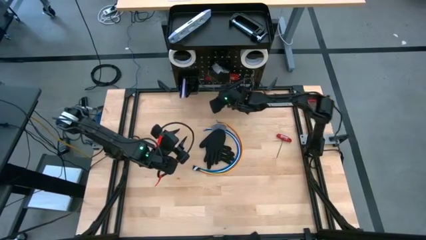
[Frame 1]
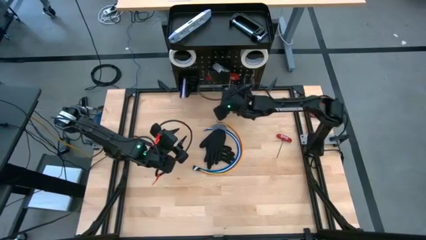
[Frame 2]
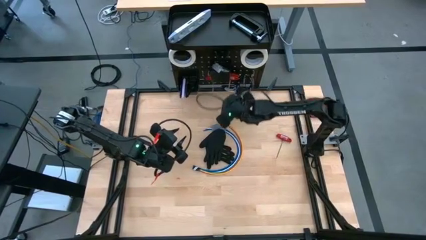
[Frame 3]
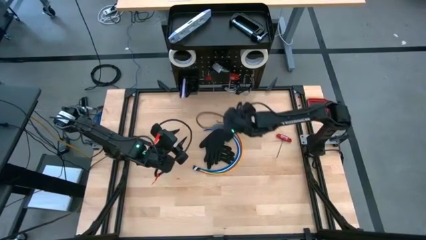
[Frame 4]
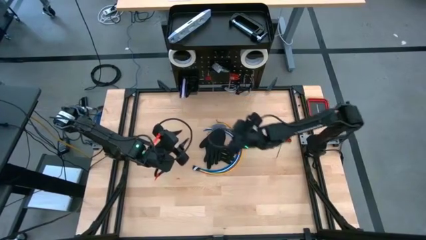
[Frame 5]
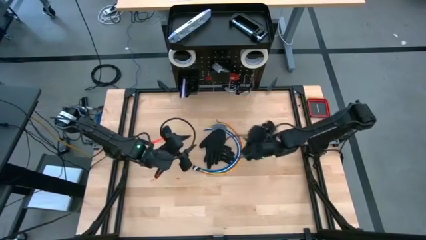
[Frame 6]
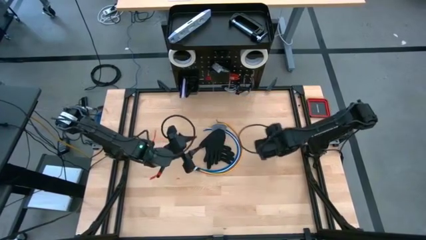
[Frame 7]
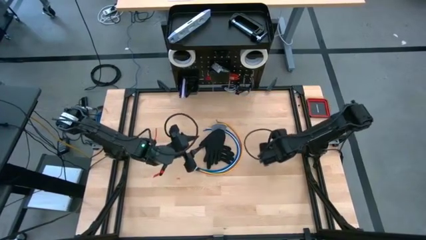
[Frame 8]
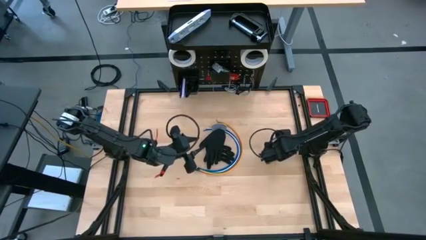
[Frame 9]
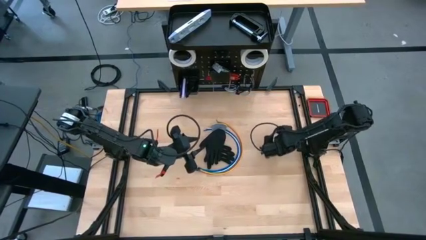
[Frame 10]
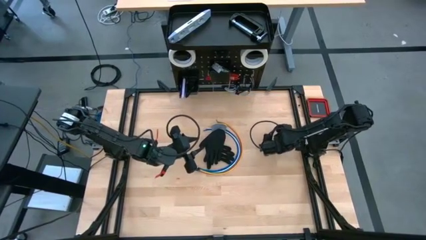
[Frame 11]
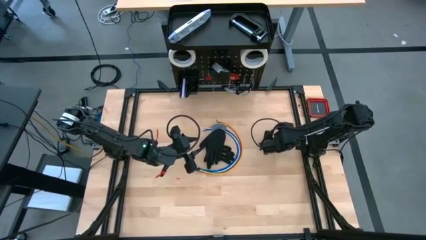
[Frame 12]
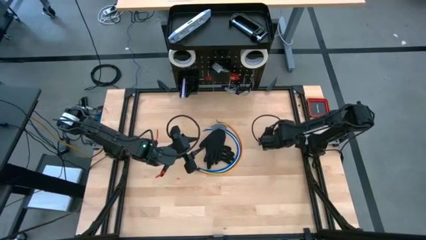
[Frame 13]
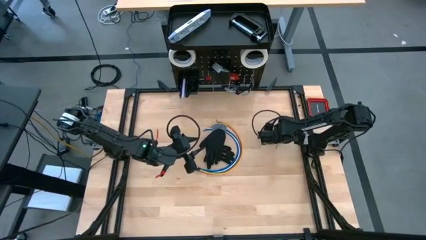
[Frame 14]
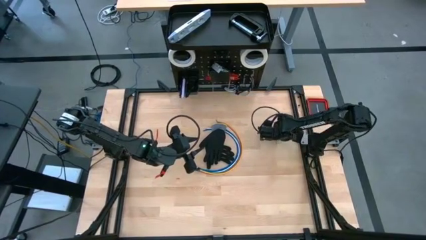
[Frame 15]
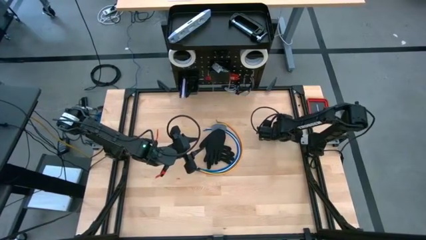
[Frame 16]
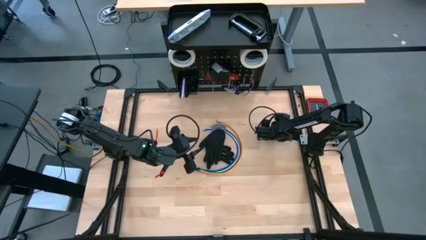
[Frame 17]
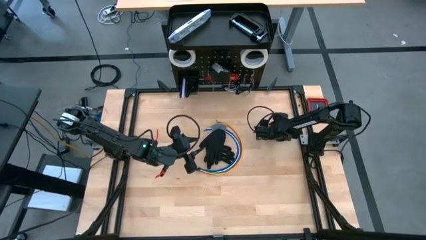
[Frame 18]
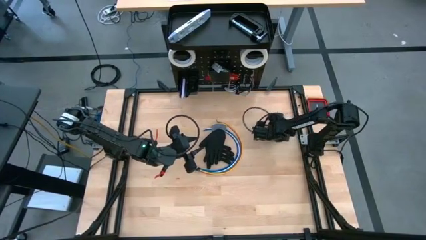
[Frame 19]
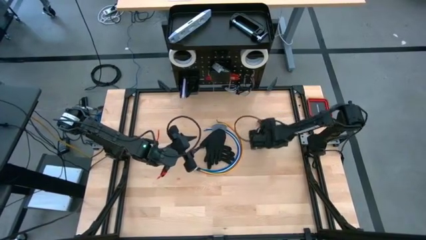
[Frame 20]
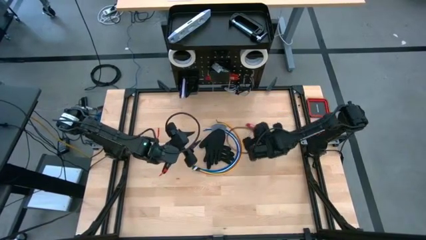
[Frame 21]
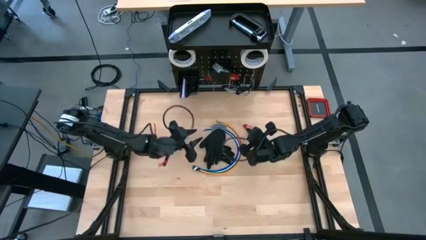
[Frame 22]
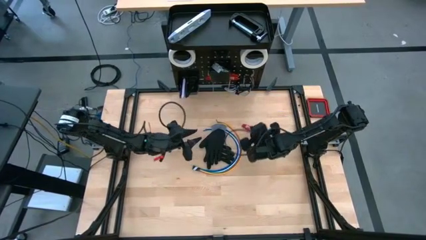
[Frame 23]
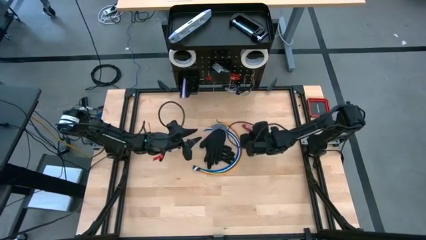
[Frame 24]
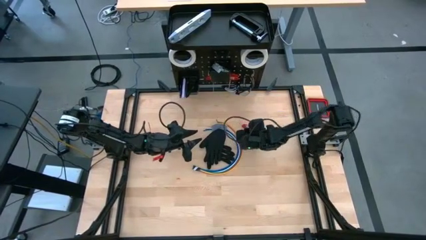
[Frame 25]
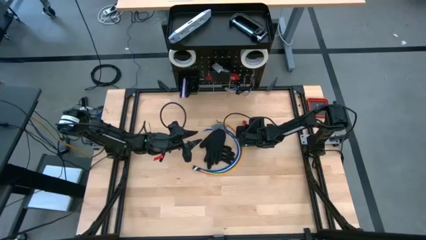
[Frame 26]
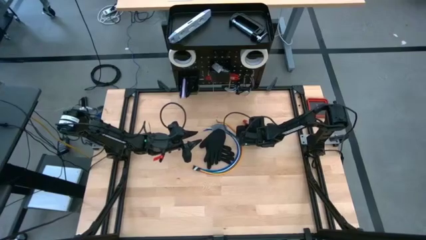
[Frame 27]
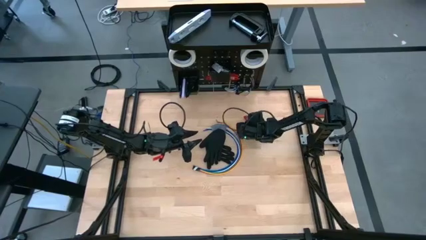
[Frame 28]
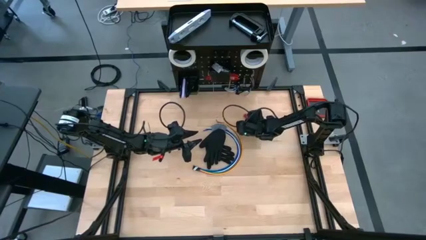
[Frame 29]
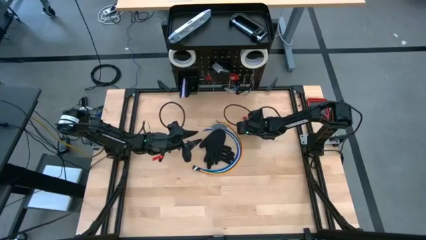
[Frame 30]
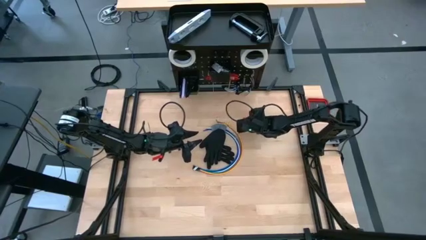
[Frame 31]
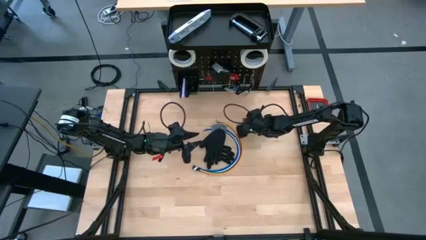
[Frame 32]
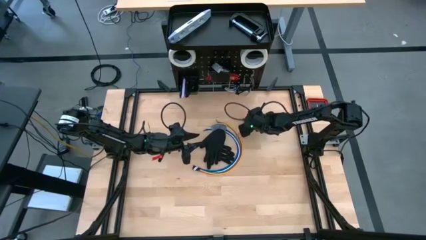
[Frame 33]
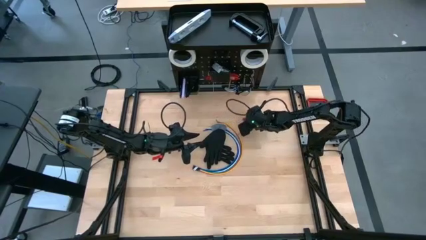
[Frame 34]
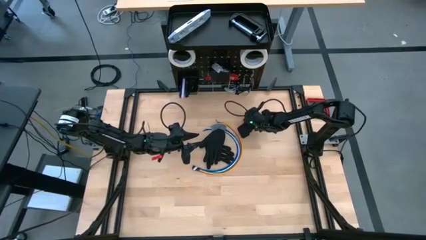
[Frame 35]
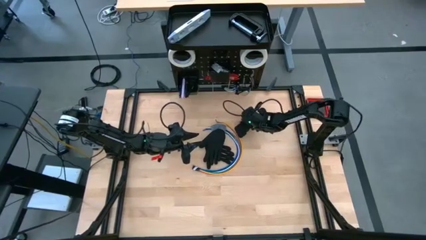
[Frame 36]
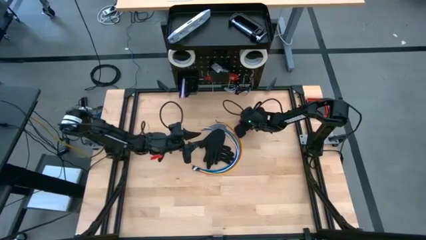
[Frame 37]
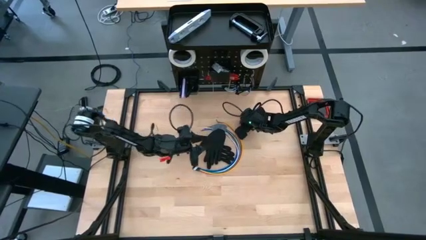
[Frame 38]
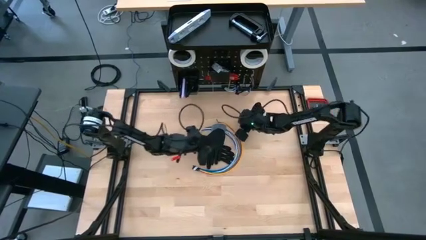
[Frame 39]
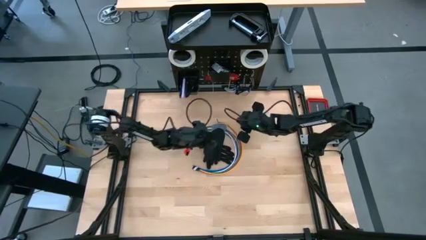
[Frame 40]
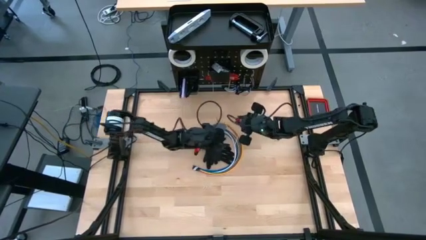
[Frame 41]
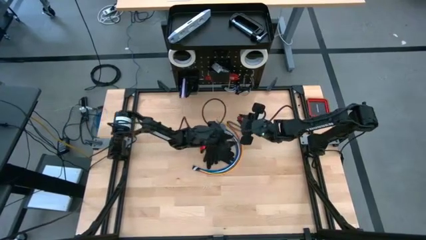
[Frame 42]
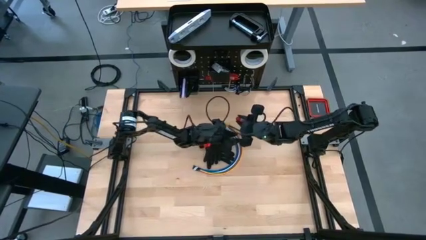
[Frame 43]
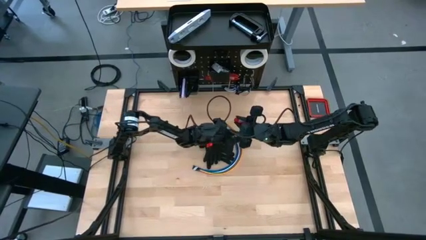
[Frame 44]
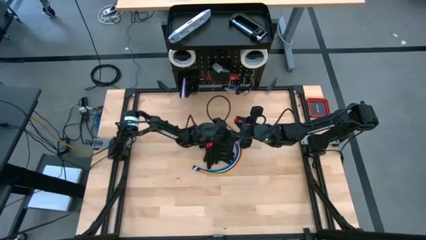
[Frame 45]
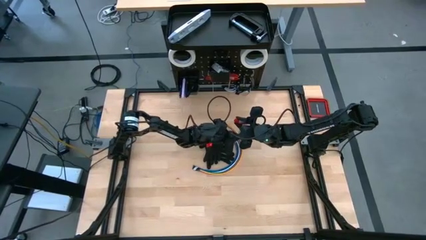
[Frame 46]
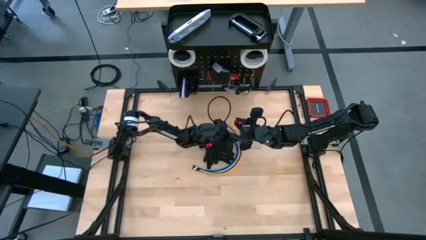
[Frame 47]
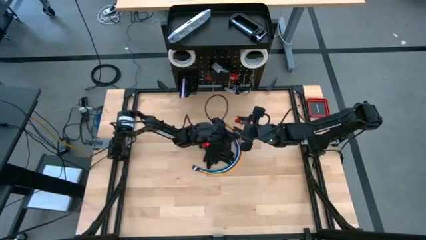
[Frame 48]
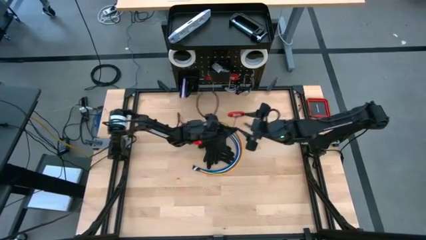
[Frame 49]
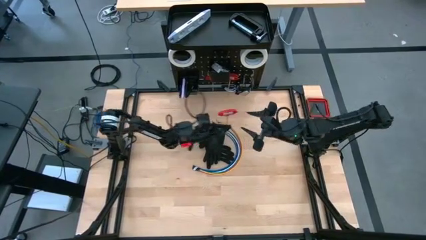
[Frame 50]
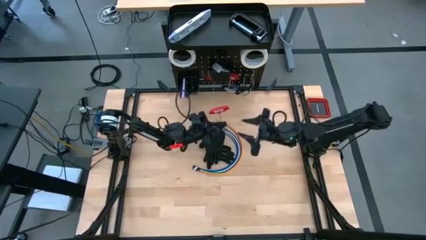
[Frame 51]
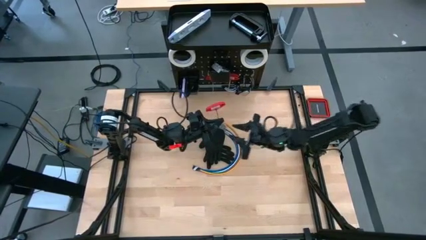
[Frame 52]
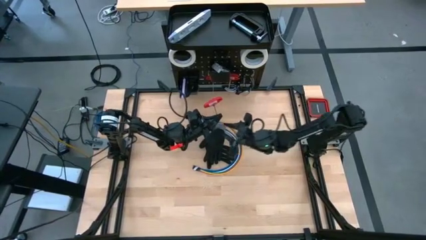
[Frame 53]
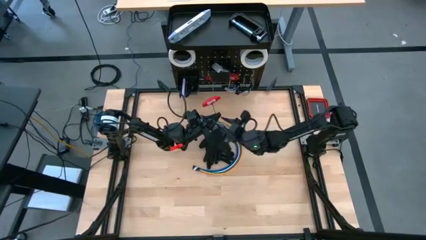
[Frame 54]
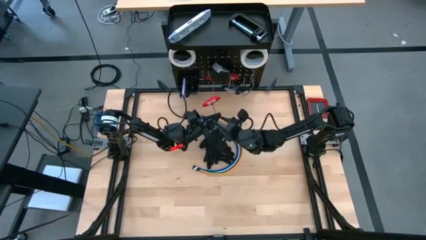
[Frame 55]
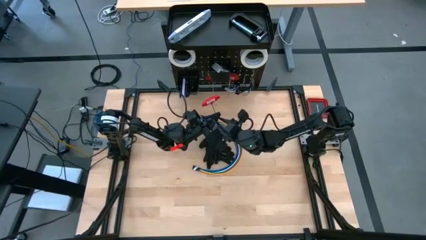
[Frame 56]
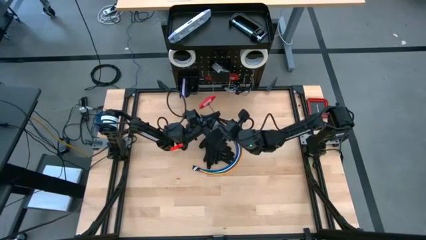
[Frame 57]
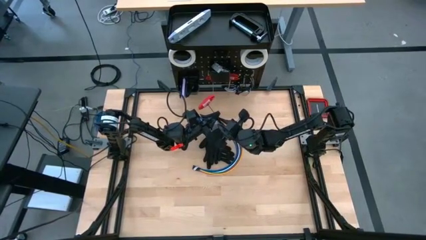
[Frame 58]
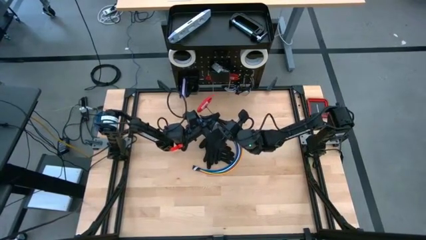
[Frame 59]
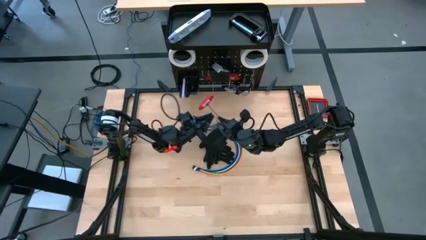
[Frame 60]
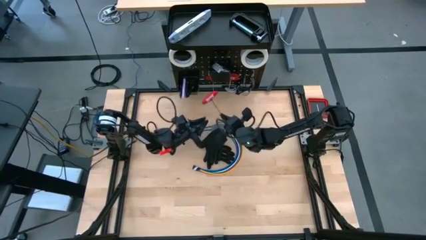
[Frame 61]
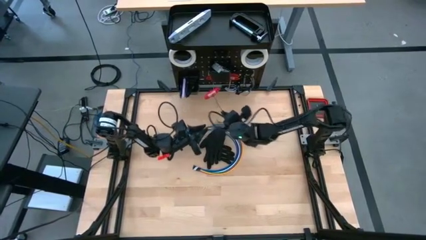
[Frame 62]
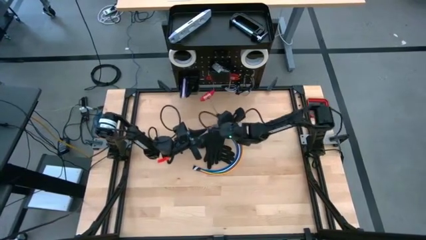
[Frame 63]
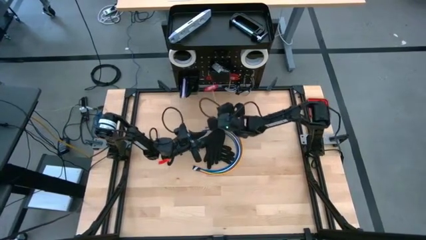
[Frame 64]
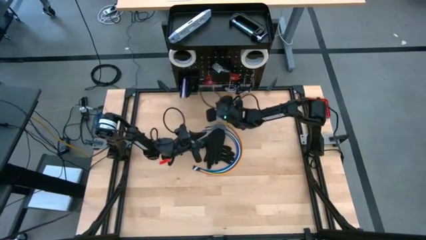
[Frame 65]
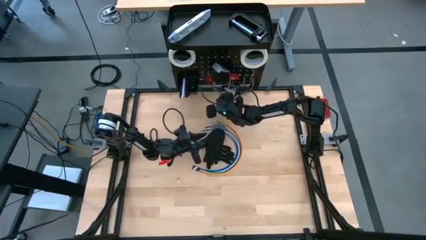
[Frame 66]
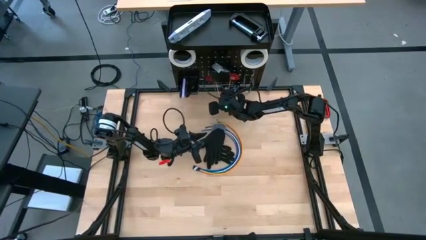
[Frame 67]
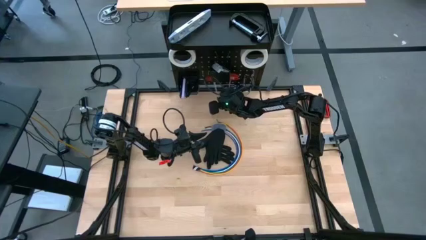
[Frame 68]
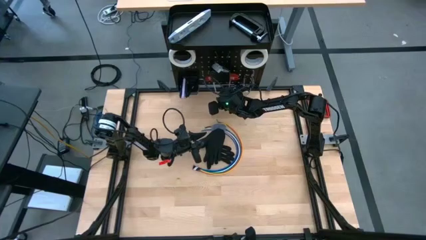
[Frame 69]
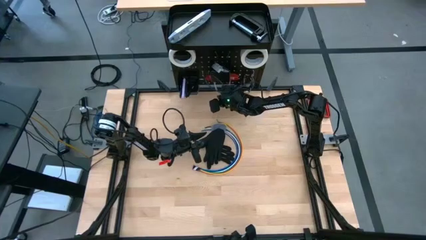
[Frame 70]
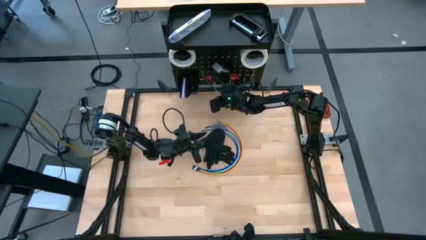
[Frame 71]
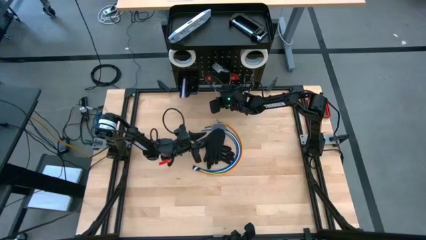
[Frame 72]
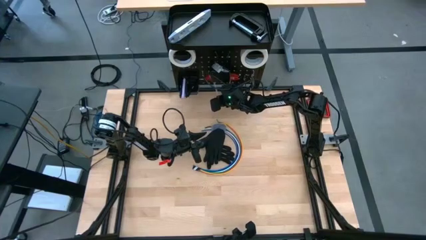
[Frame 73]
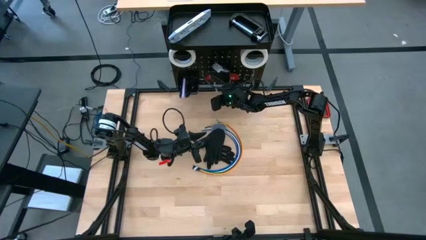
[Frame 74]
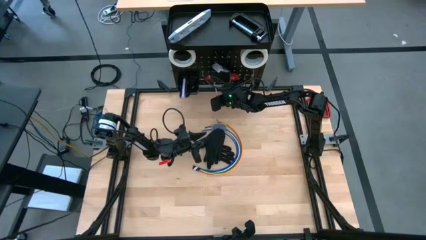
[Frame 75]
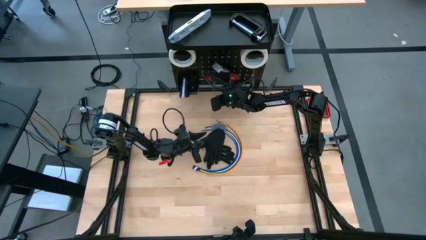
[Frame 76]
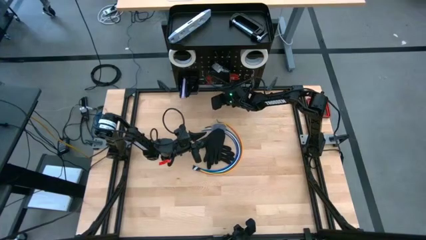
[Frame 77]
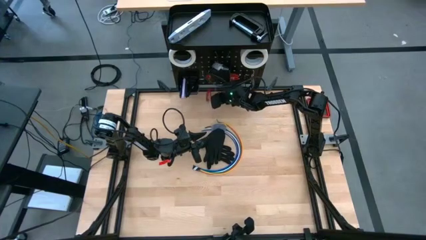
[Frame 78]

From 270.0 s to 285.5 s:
Task: Hang tools onto peg board
Hang the red allen wrench on the peg board

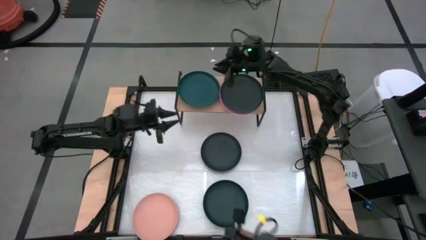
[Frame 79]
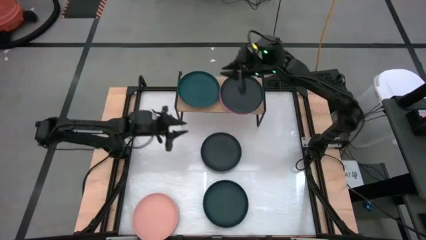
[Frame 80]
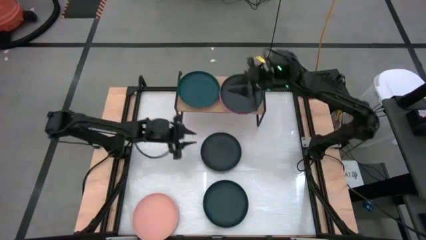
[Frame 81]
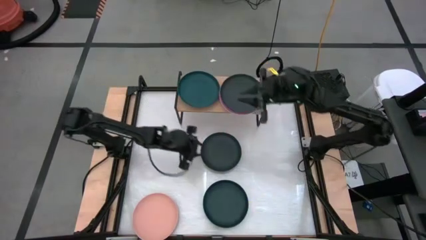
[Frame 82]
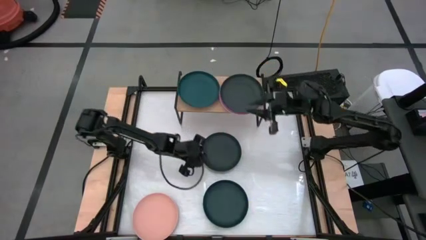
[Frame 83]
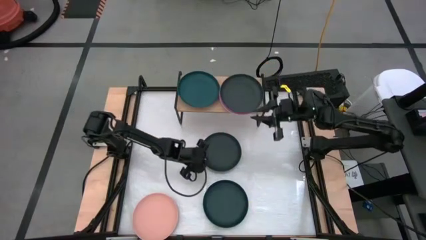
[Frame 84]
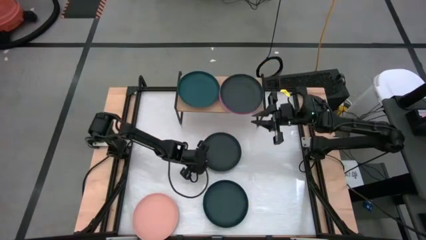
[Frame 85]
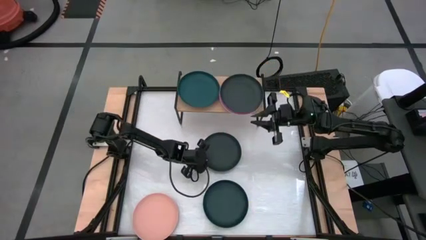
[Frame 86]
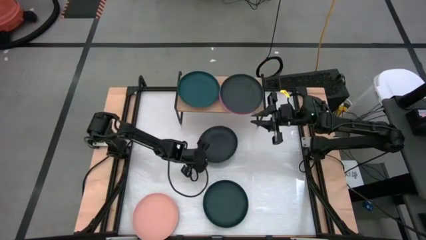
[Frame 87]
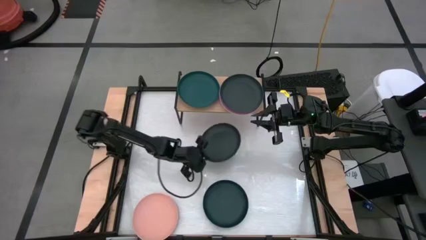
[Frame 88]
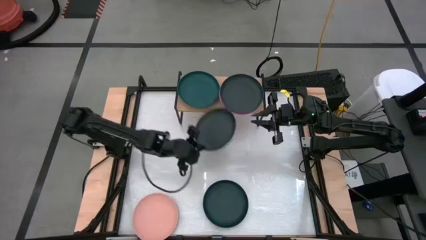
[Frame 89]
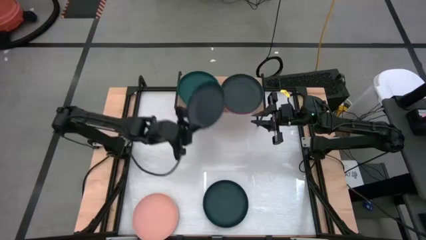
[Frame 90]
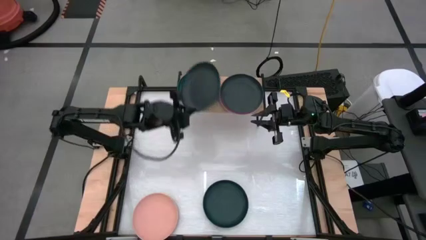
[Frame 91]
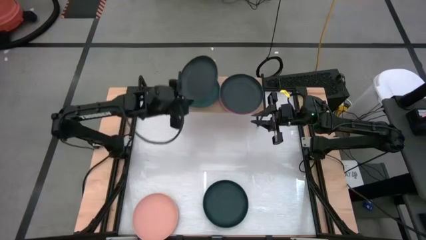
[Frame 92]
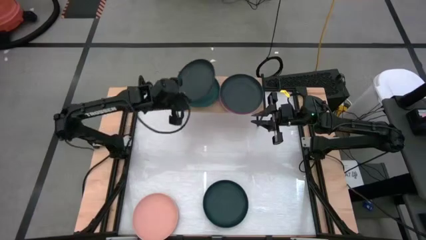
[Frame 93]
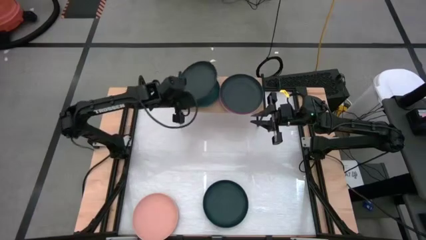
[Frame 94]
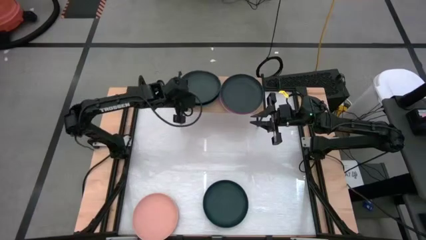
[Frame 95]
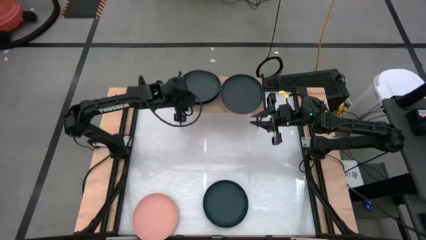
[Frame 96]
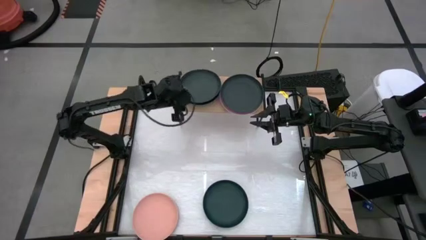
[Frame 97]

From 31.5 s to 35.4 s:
Task: Place and stack plates onto a shelf
Stack the top black plate on top of the dark green plate on the shelf
